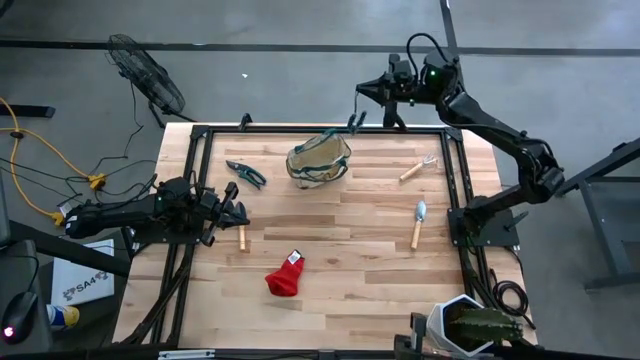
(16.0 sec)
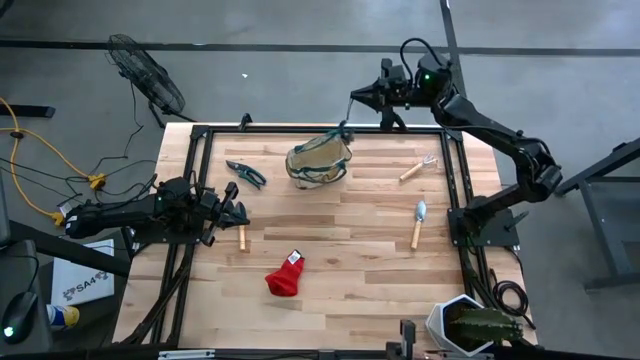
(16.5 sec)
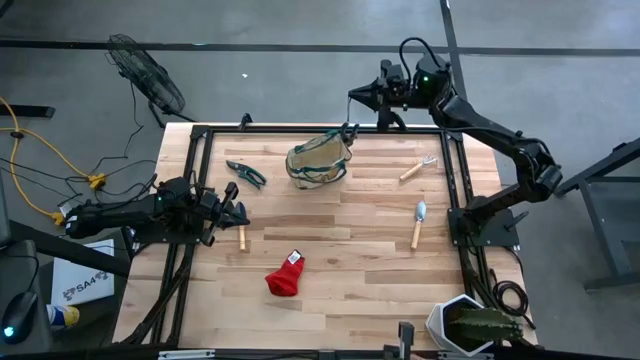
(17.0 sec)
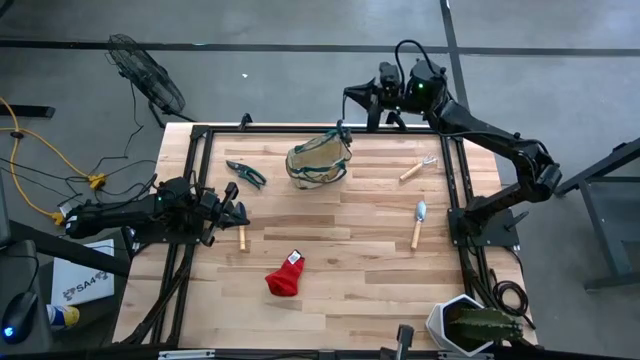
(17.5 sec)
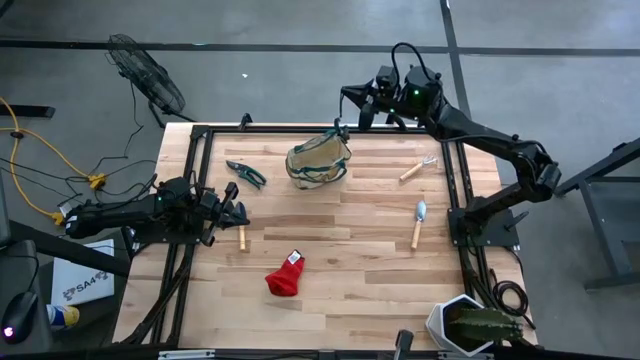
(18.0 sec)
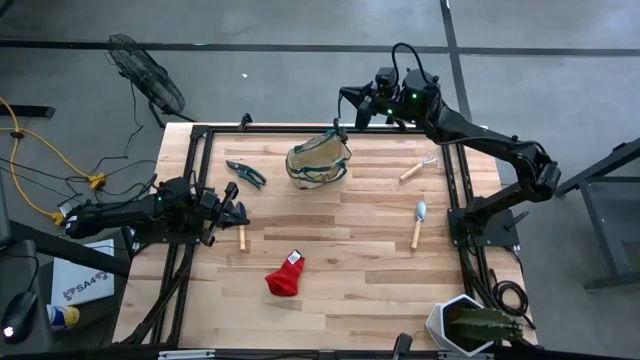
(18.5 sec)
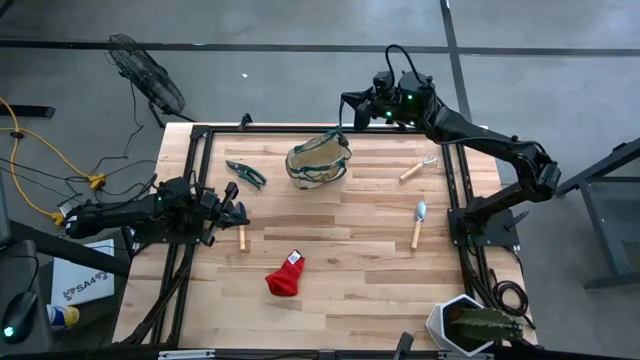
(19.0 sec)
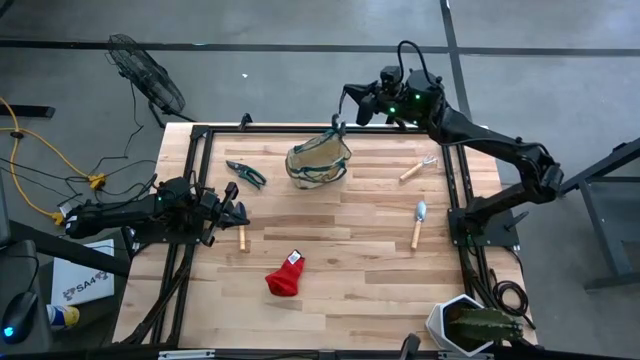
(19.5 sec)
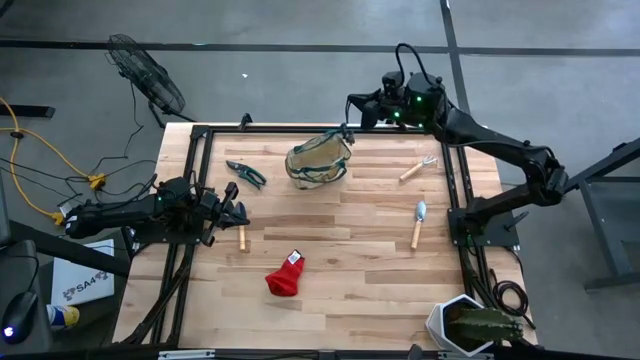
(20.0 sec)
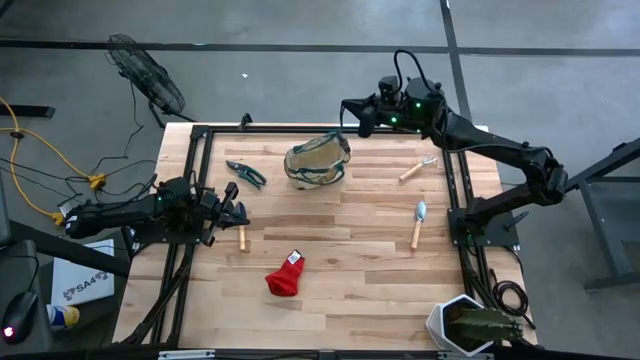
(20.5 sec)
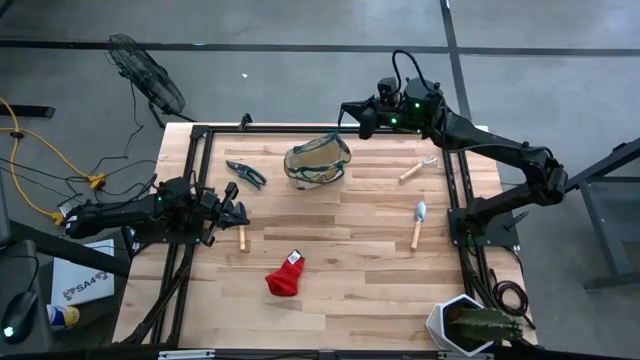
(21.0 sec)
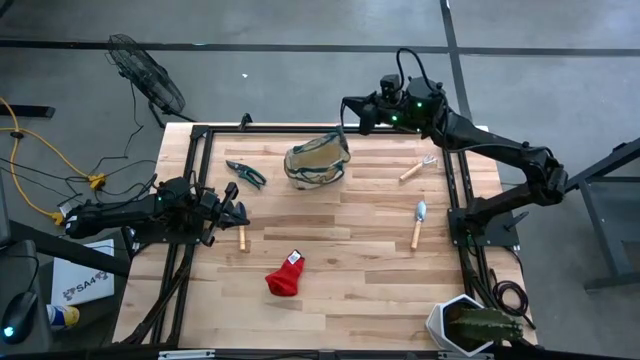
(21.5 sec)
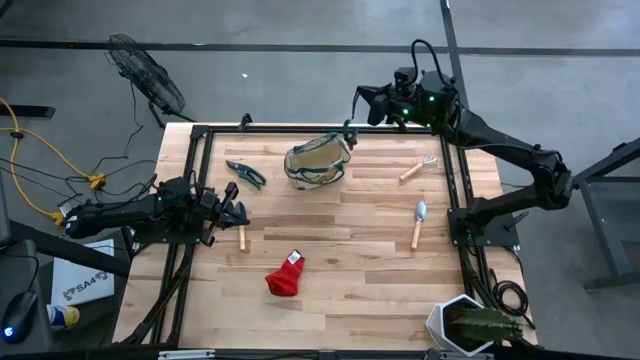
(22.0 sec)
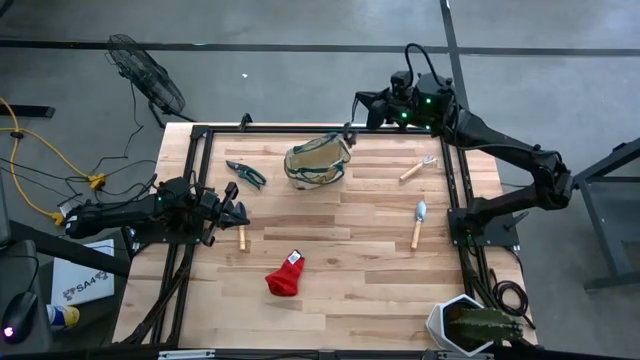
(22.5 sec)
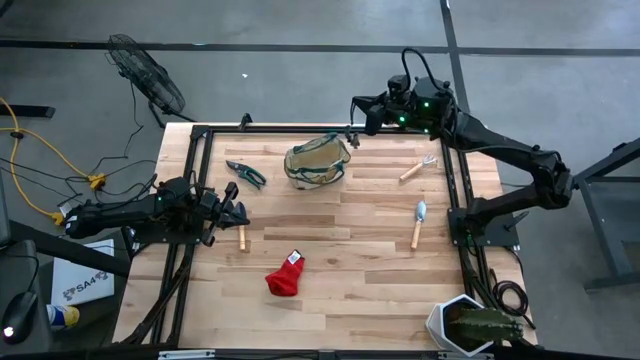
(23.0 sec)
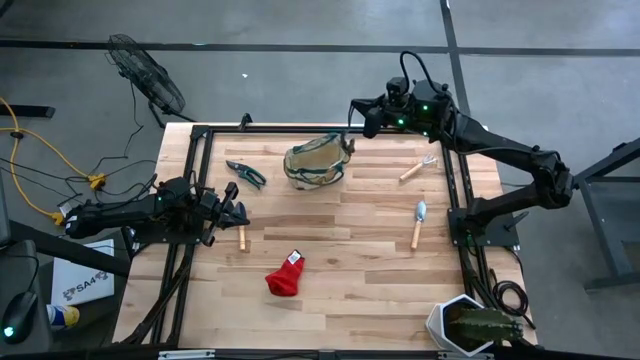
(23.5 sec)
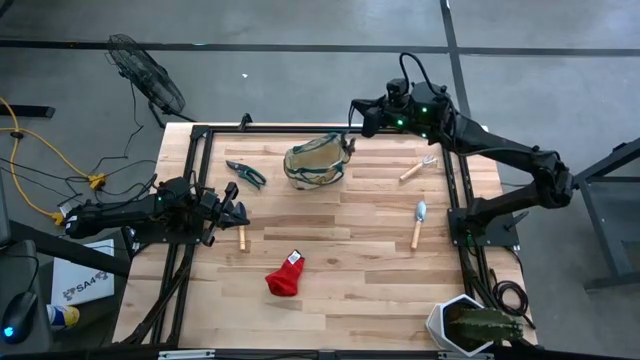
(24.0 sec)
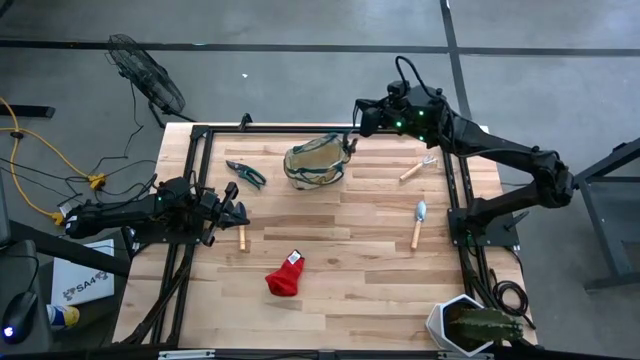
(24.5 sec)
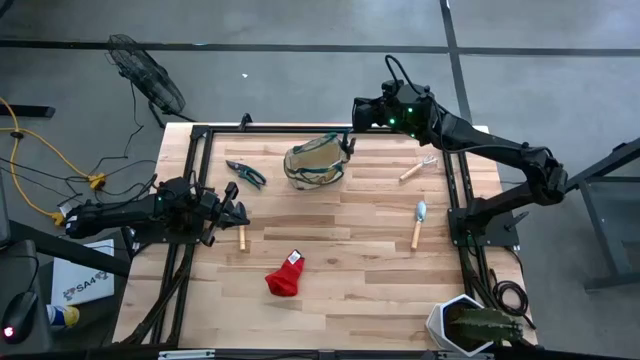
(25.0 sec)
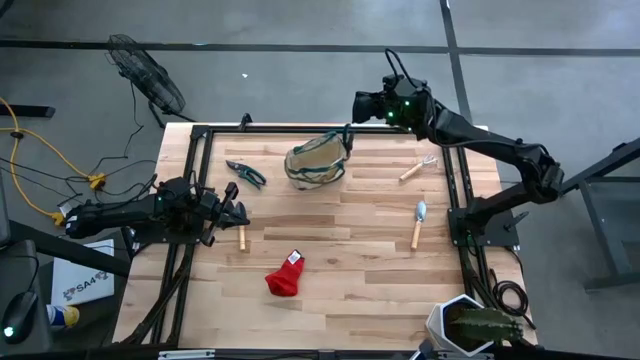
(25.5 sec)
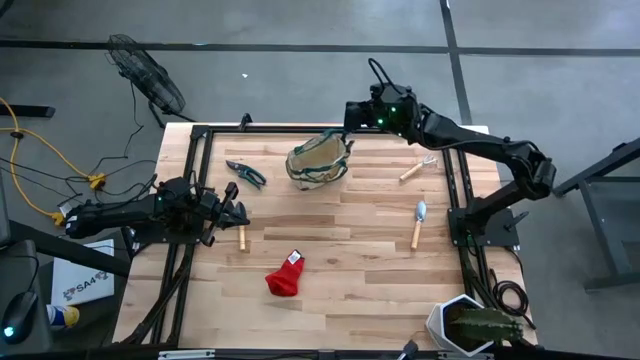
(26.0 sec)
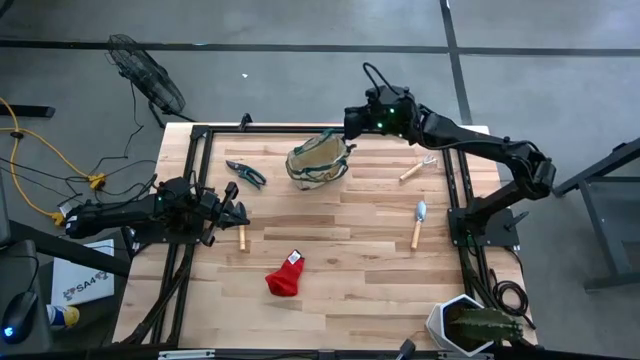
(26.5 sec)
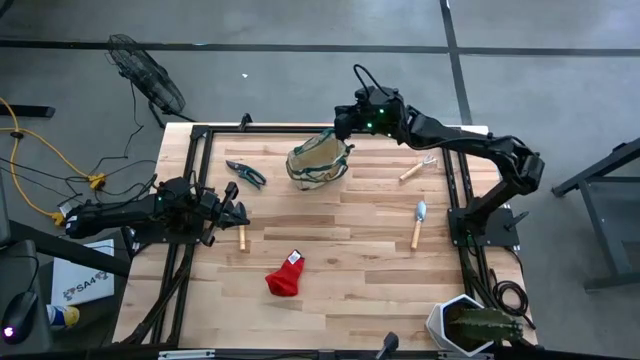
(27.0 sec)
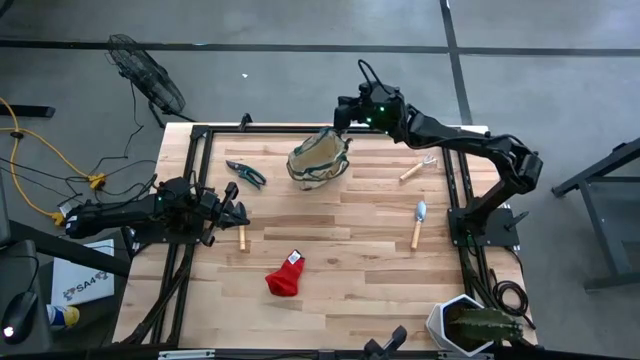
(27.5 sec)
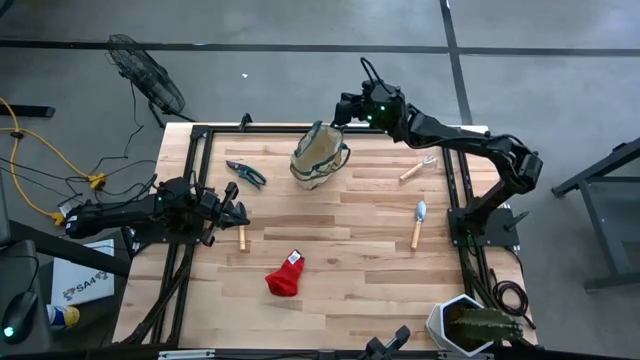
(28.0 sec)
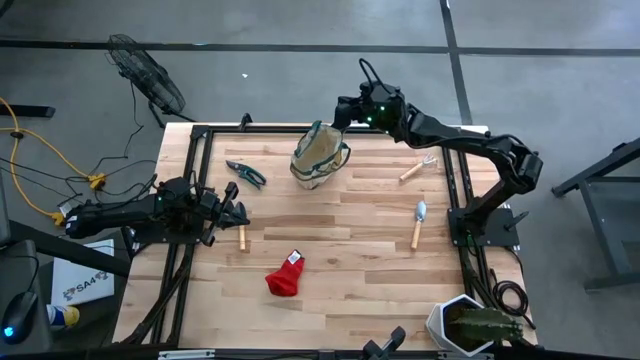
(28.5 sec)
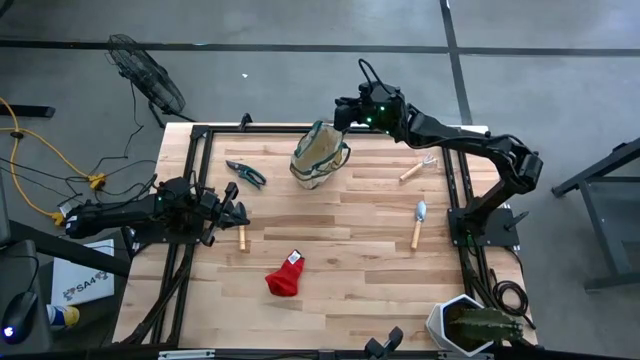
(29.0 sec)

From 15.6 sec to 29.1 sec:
Task: Pick & Place Garden tools in Gardening bag
Put the green shears into the white gardening bag

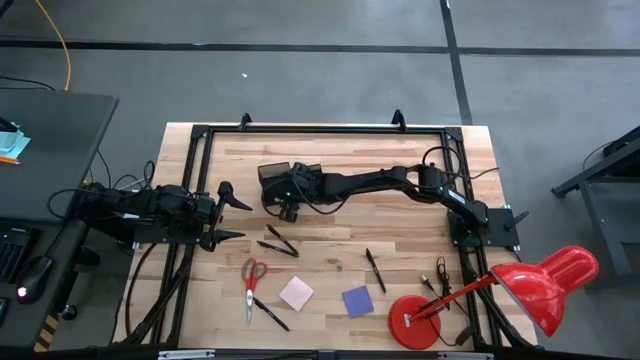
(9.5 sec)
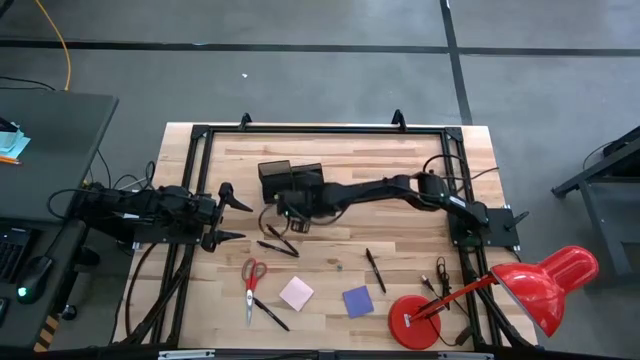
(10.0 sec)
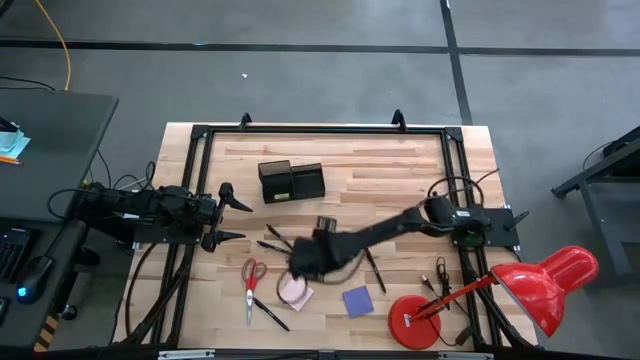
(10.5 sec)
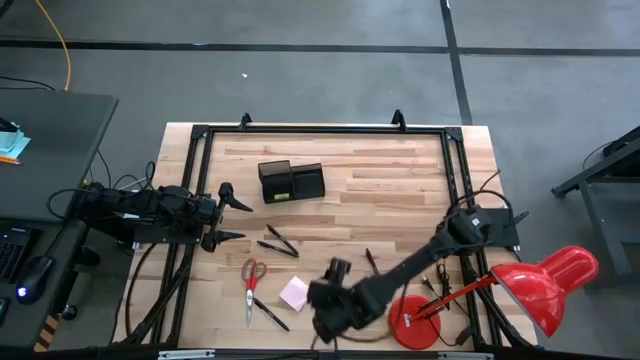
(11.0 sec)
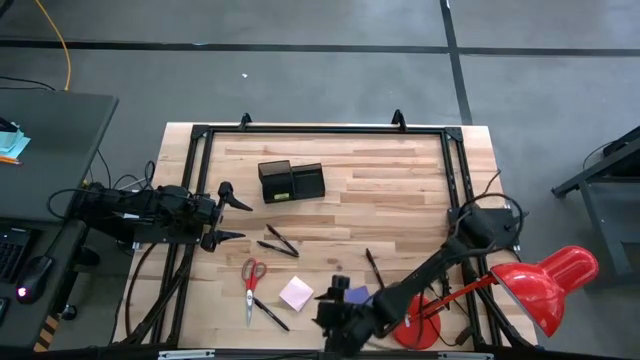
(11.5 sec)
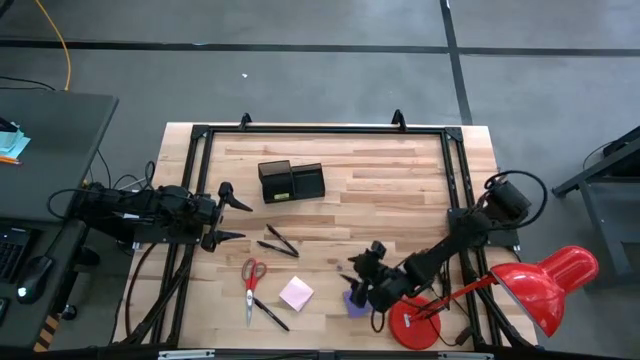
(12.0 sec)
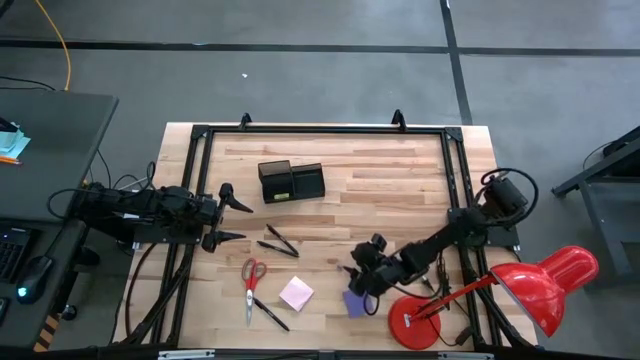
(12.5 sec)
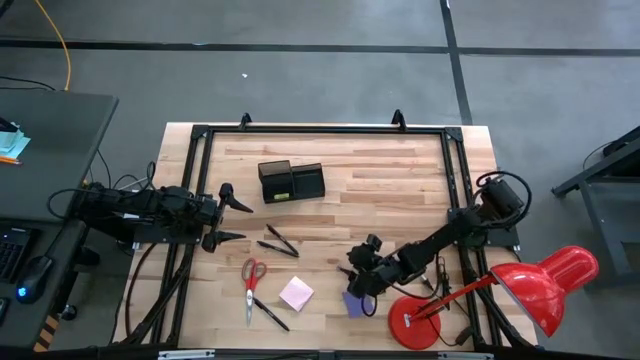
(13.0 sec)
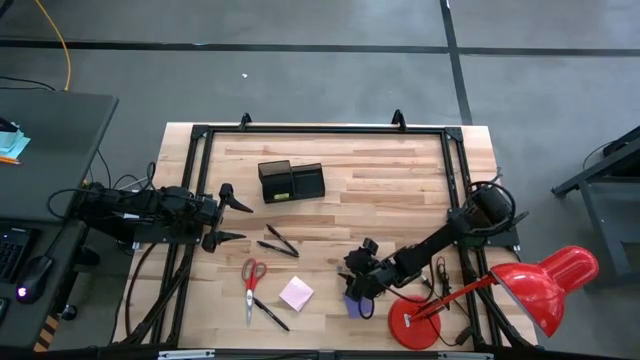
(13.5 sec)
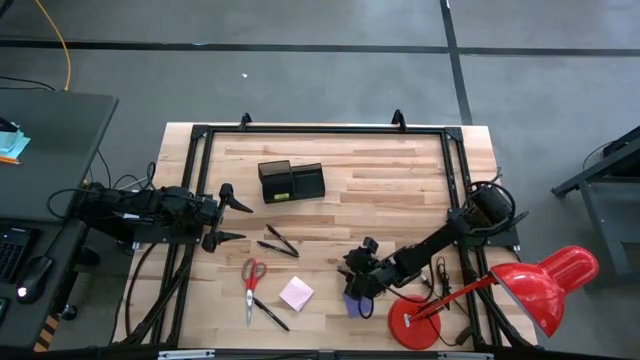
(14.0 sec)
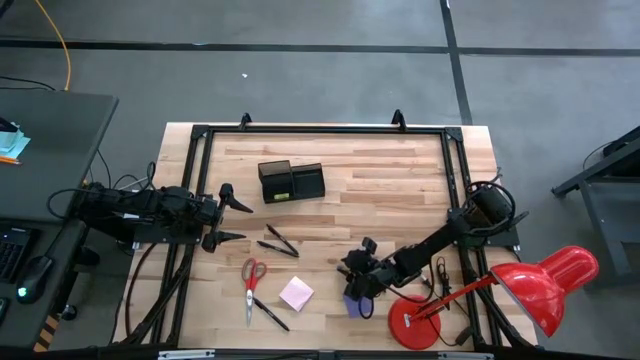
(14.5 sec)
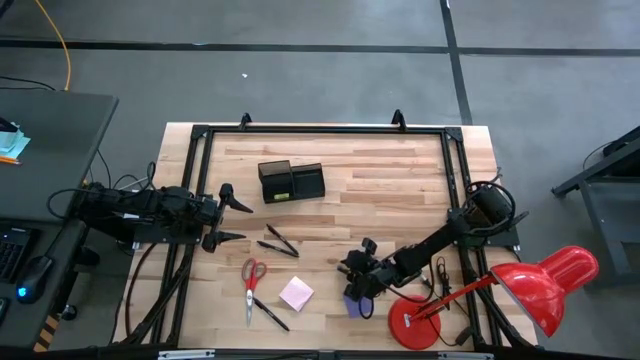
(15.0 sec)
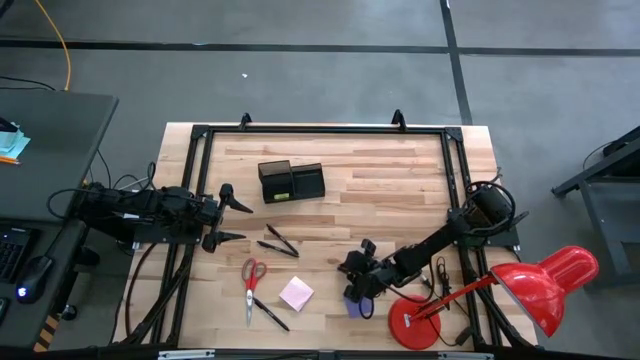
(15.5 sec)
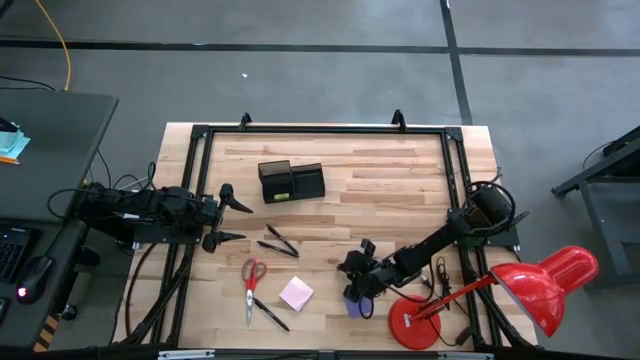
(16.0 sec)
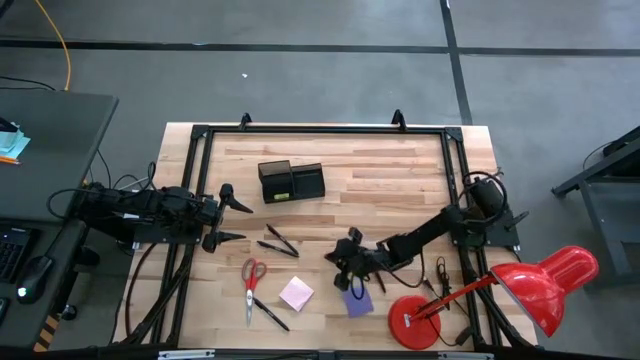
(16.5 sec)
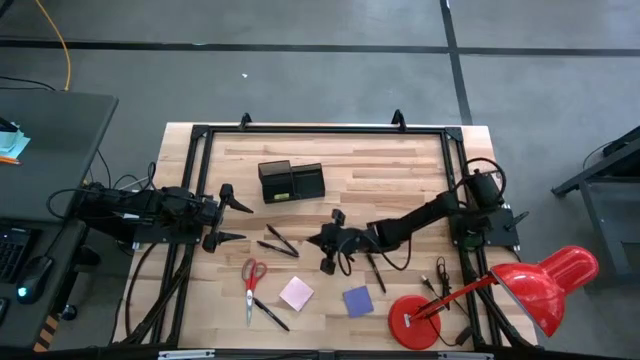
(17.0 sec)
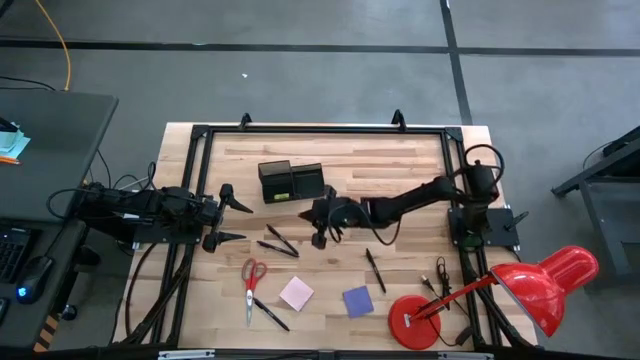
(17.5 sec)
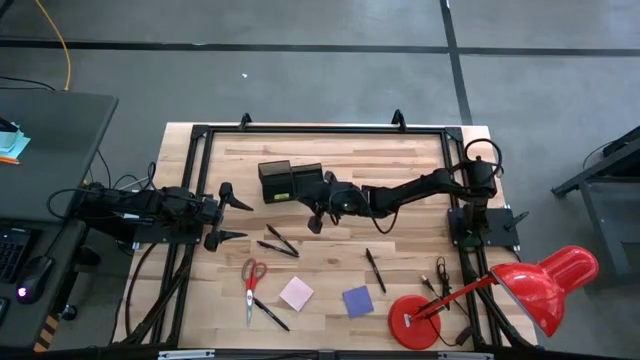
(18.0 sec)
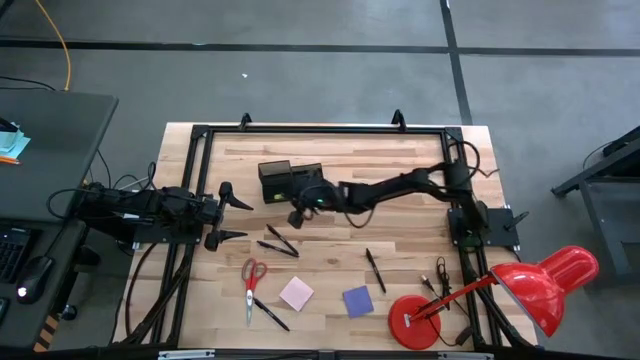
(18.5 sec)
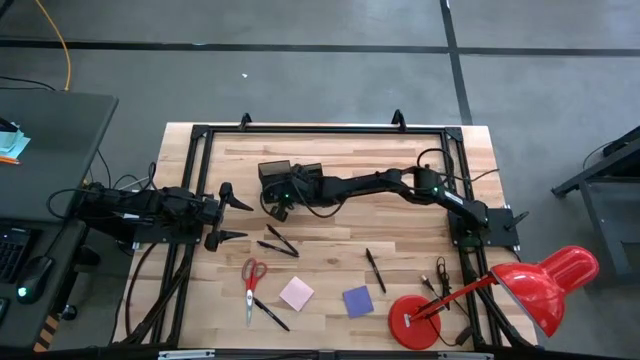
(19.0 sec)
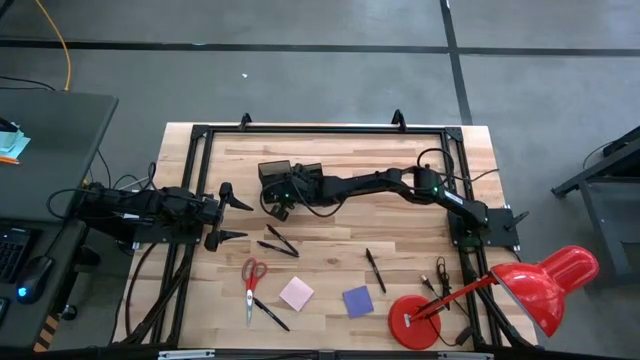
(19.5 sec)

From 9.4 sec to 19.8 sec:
Task: Pick and place office supplies into organizer
Put the blue binder clip into the black desk organizer
